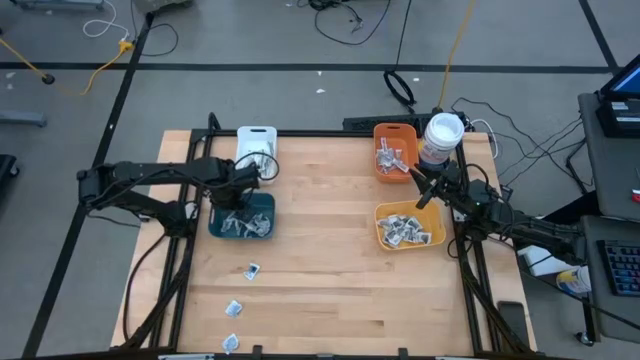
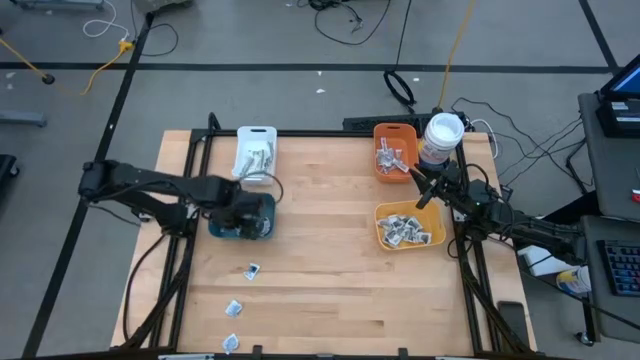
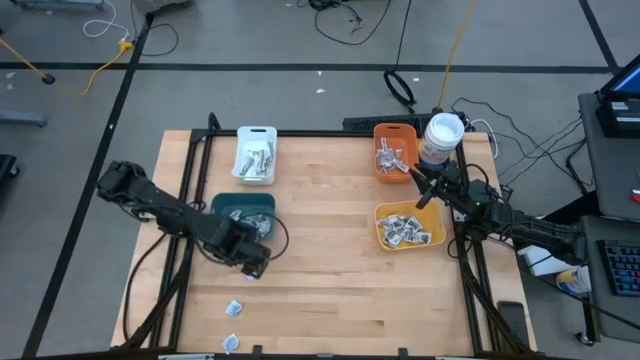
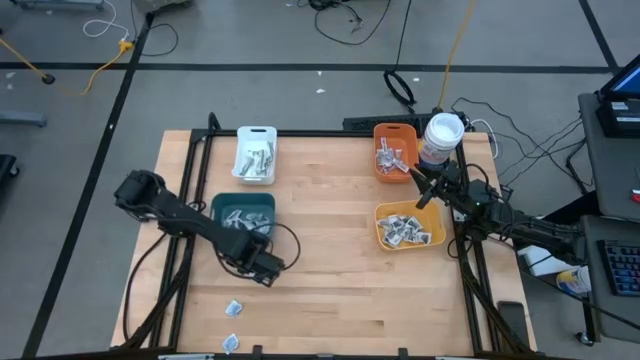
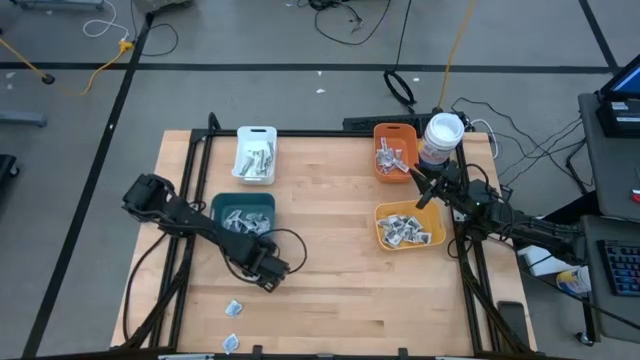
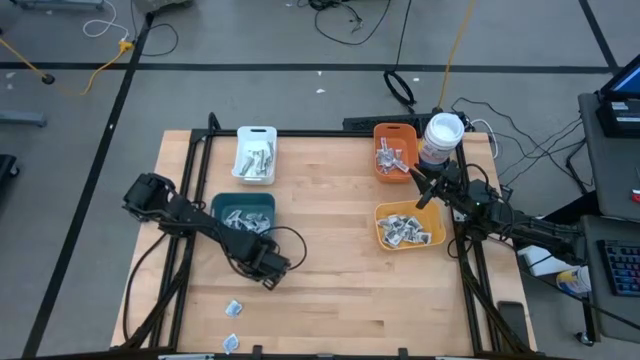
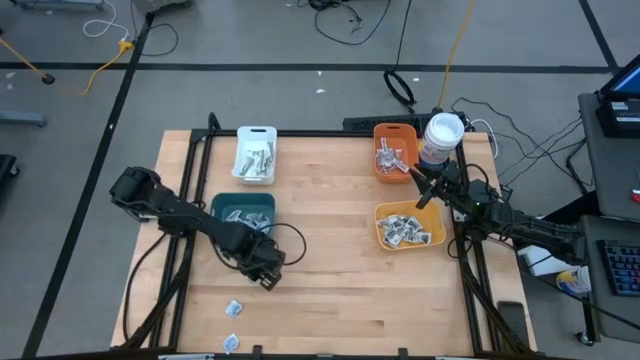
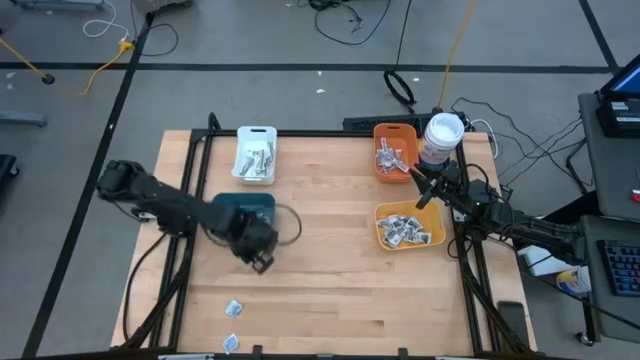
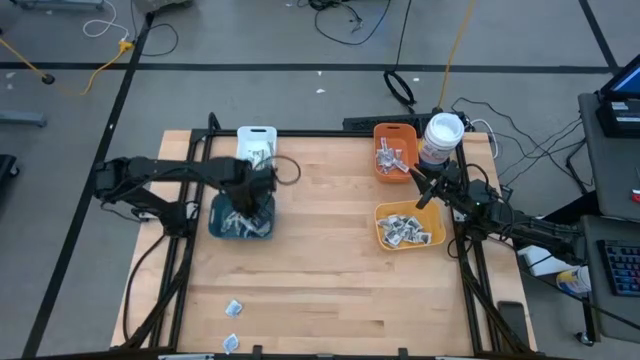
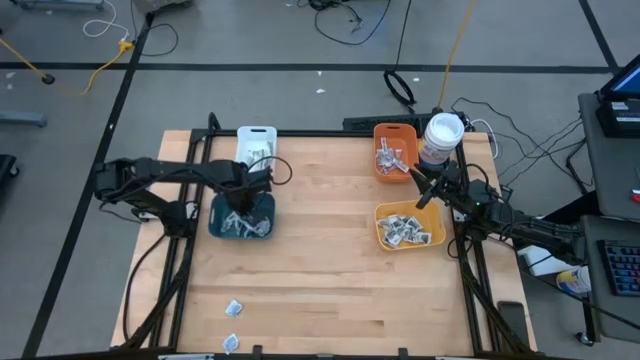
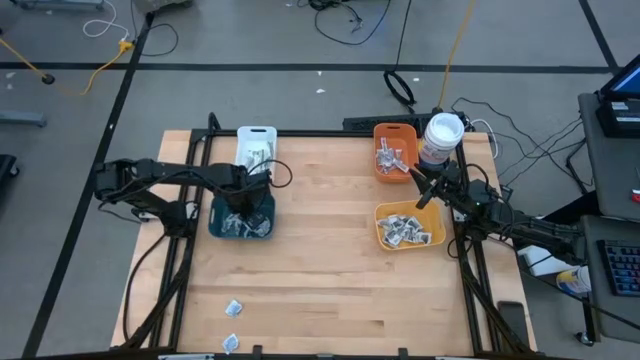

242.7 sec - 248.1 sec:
Task: Pick & Place First Aid Supplies
Put the alcohol pad into the blue bin

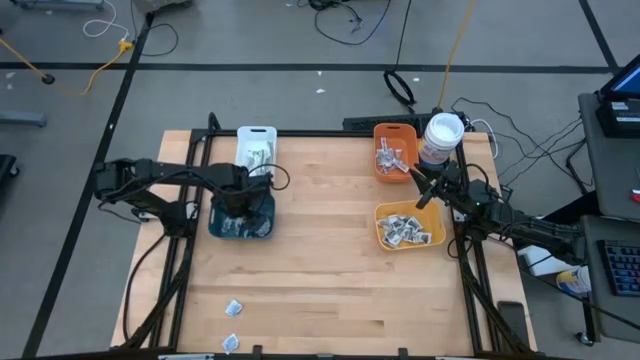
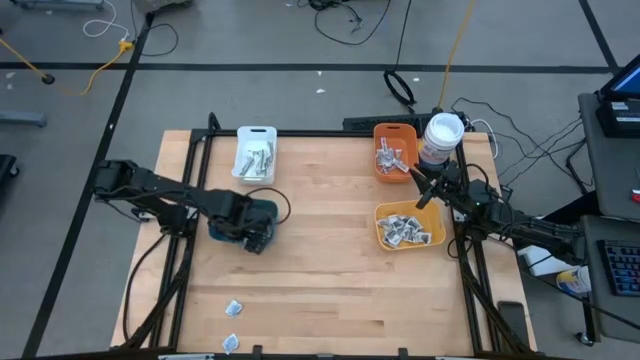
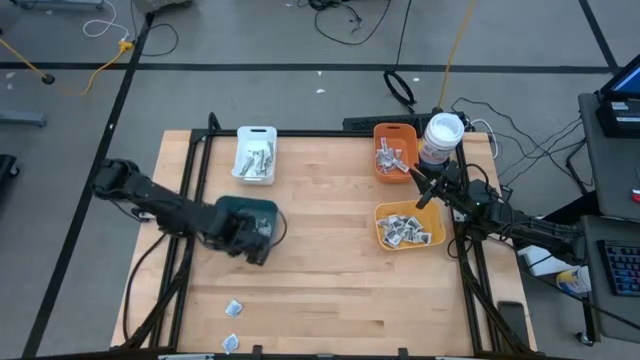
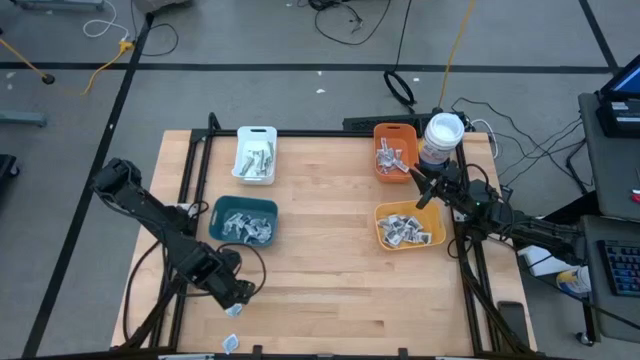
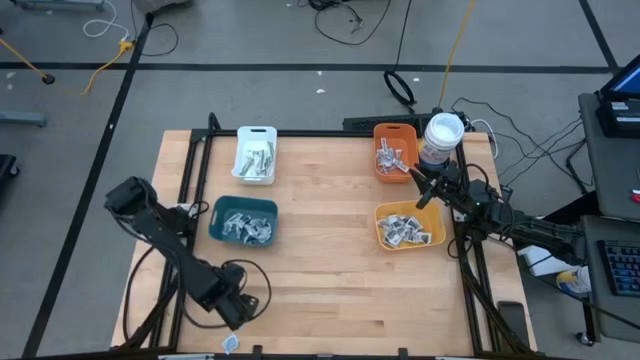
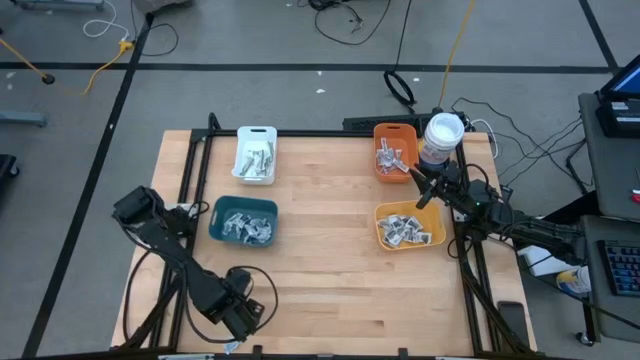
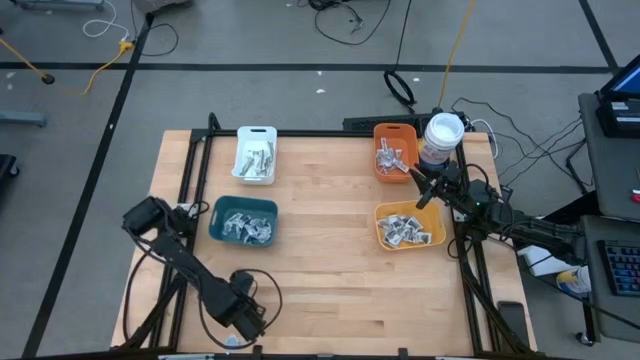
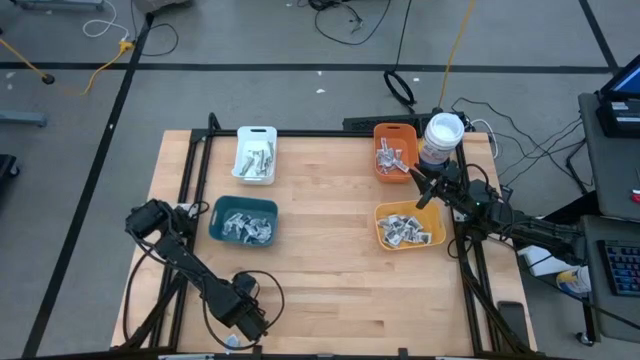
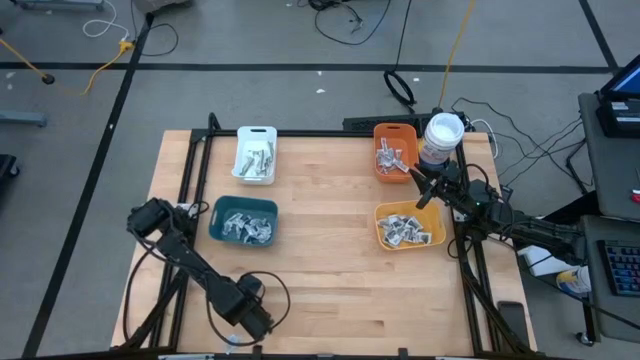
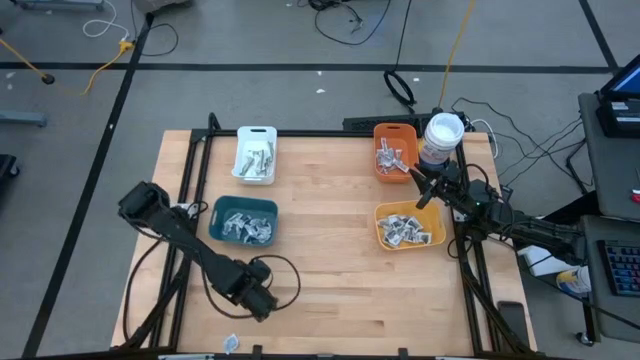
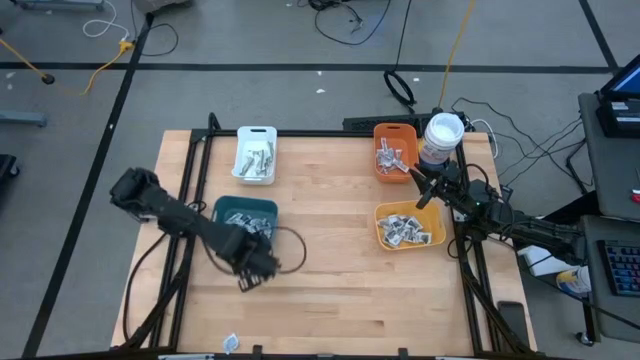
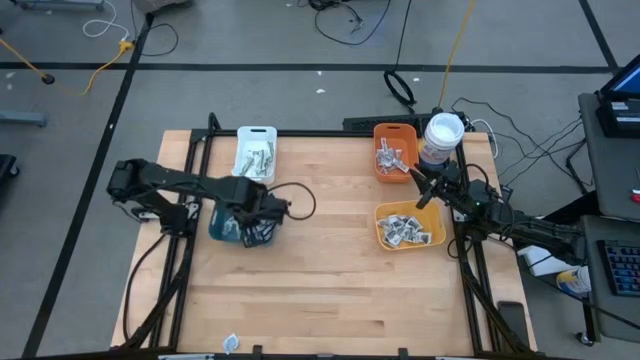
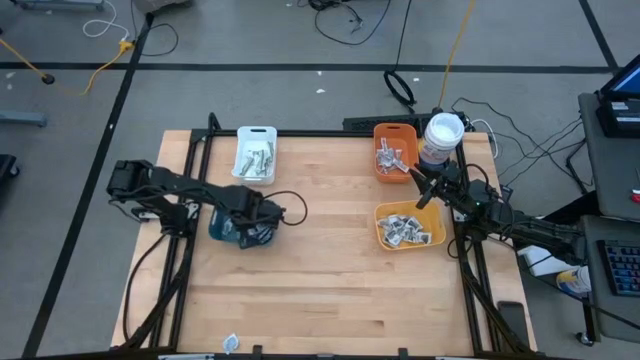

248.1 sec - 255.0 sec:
Put the alcohol pad into the blue bin

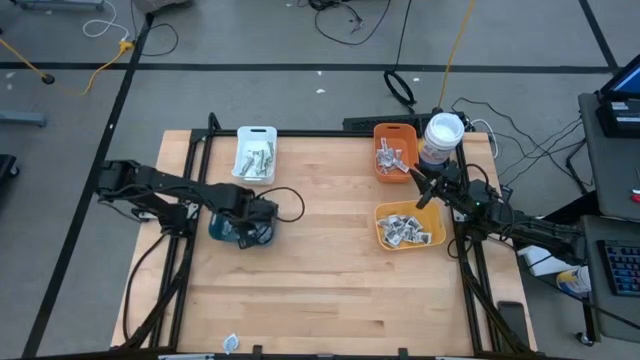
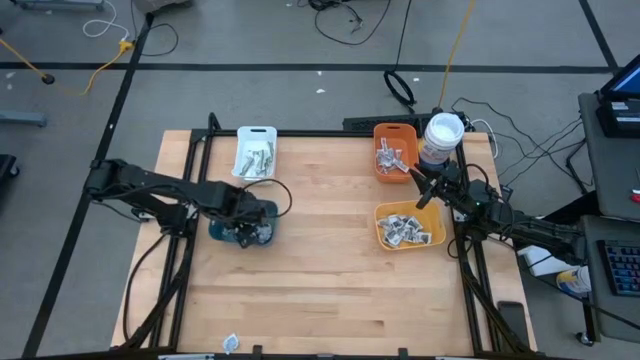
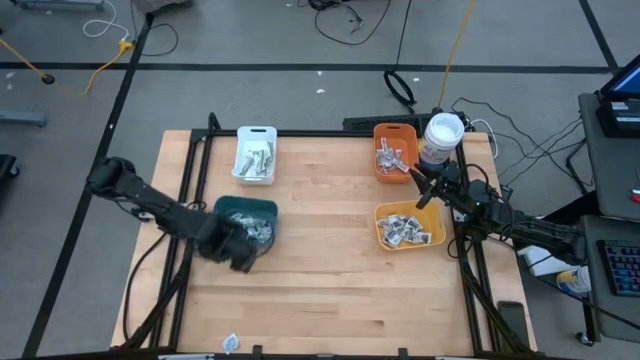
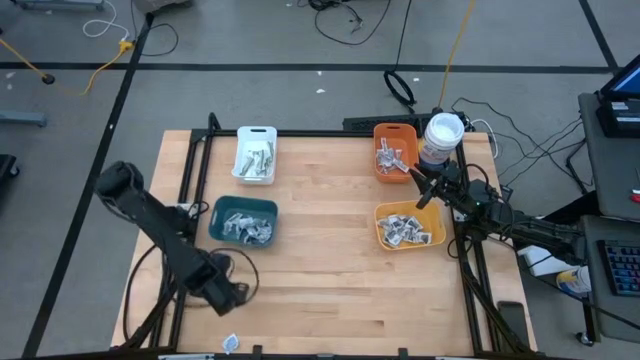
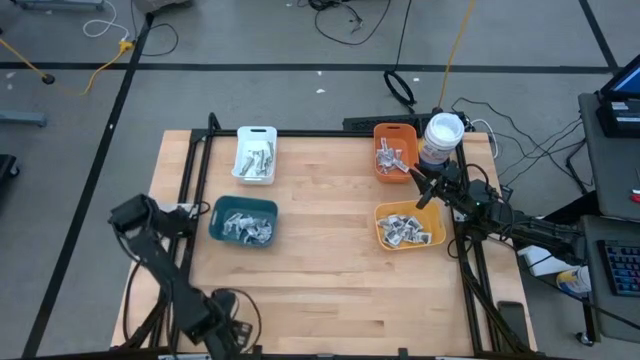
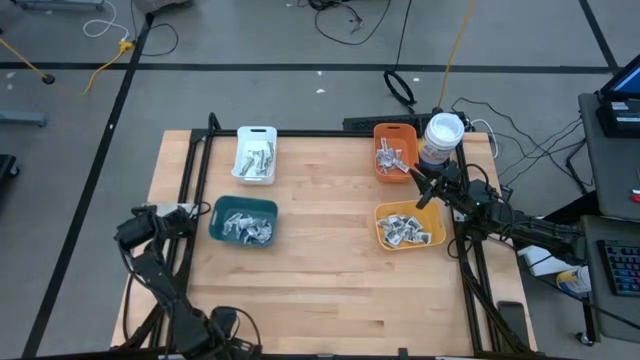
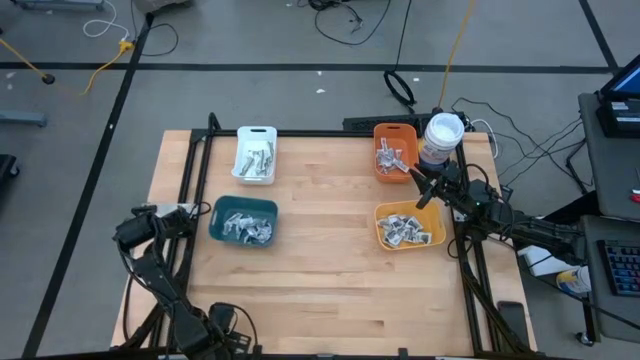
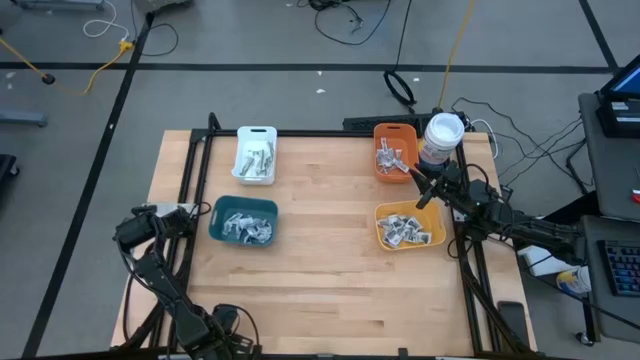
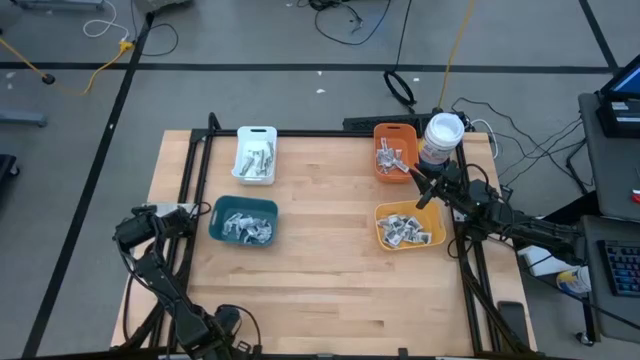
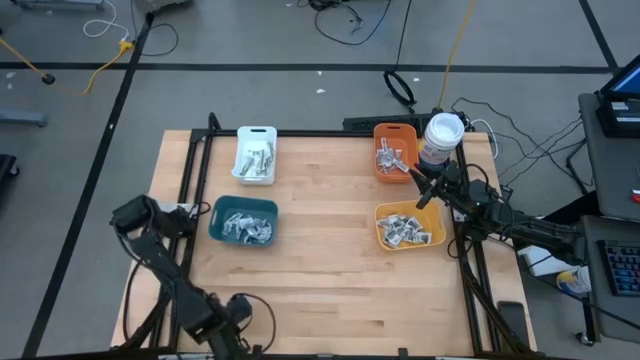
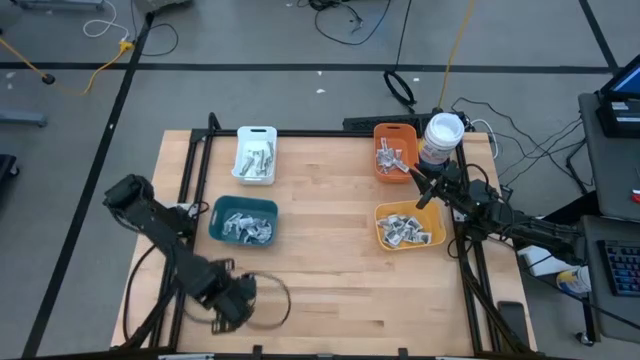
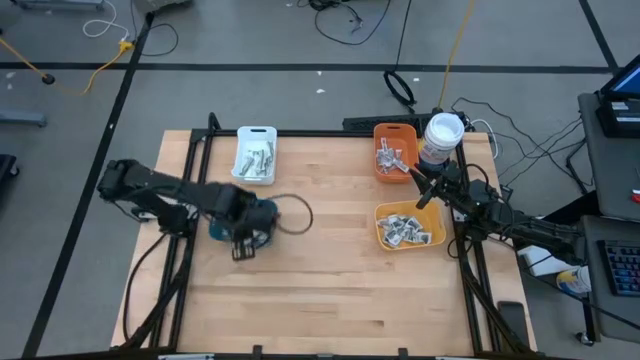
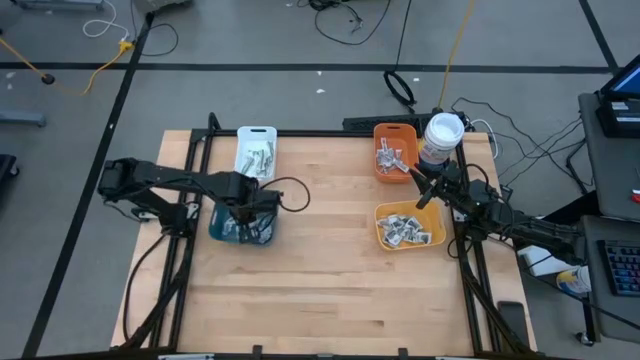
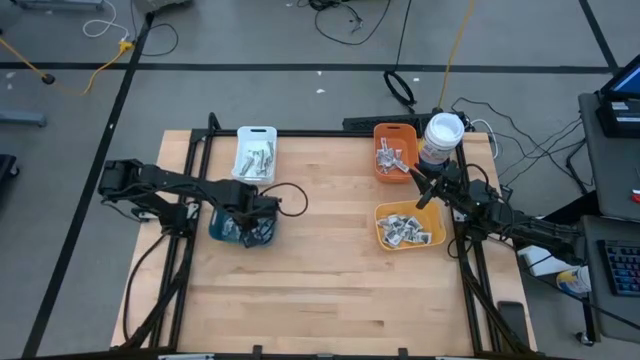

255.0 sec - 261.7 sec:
Put the alcohol pad into the blue bin
